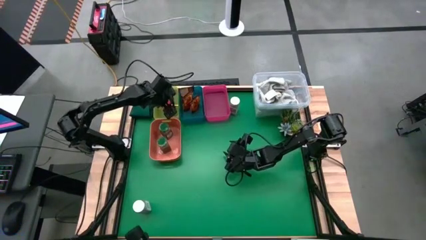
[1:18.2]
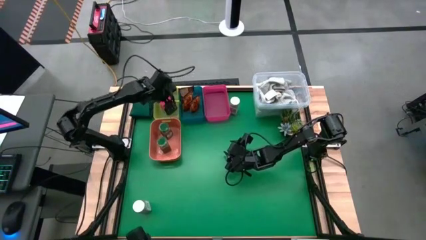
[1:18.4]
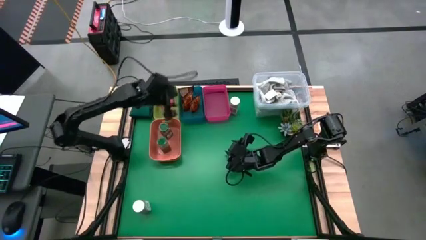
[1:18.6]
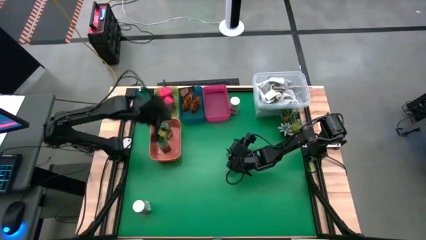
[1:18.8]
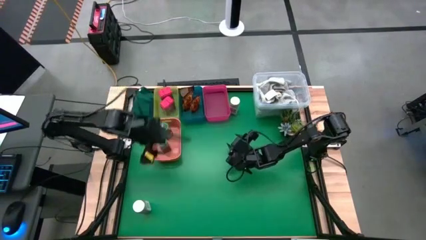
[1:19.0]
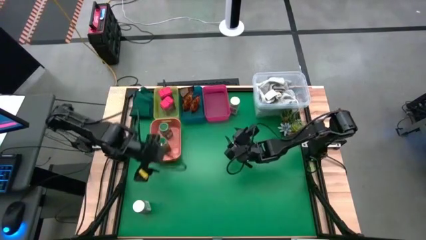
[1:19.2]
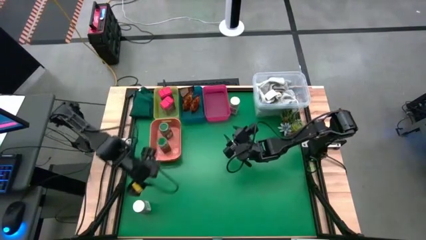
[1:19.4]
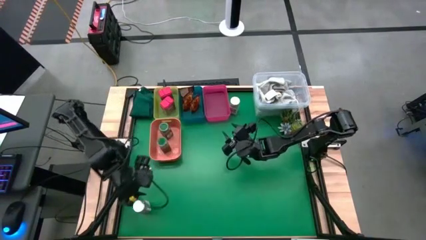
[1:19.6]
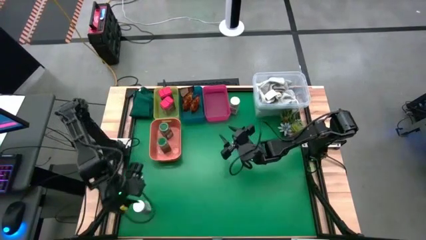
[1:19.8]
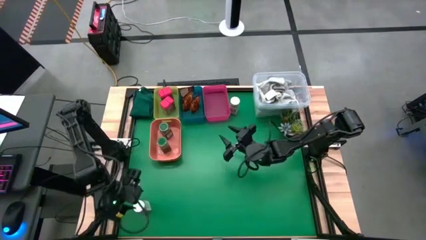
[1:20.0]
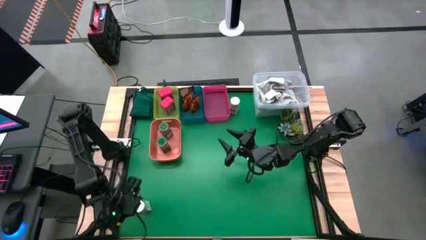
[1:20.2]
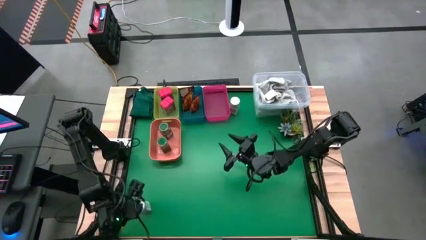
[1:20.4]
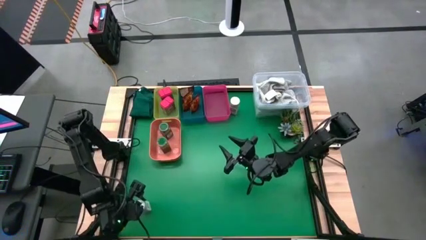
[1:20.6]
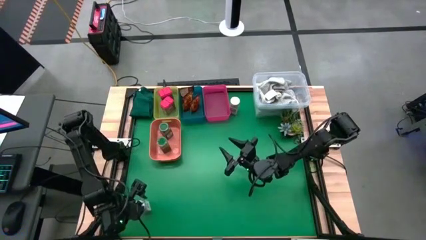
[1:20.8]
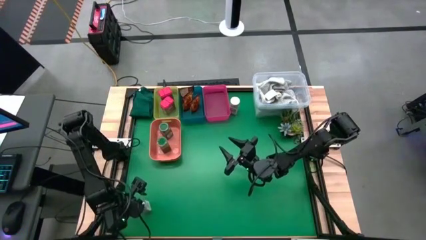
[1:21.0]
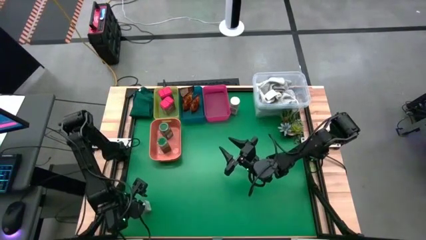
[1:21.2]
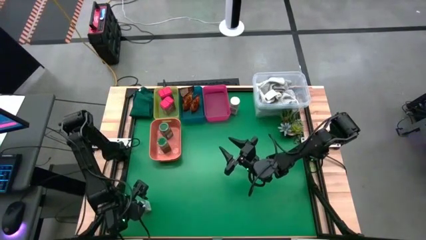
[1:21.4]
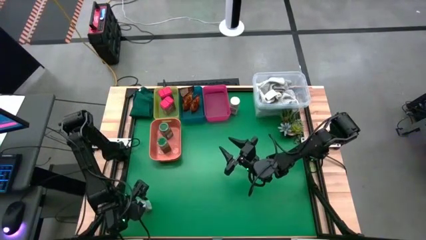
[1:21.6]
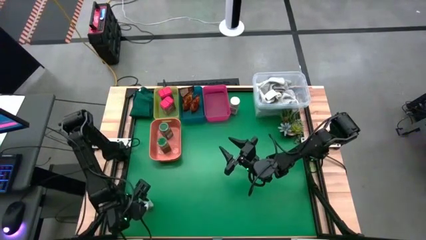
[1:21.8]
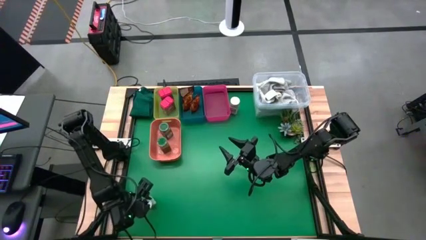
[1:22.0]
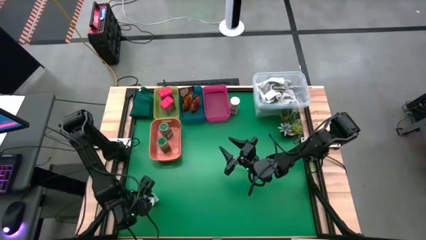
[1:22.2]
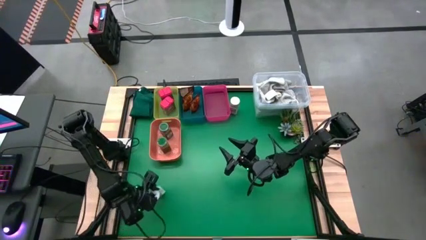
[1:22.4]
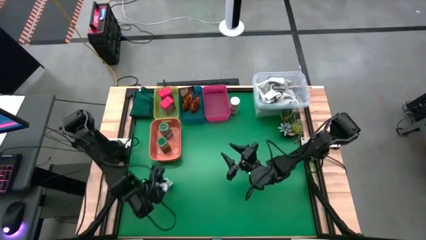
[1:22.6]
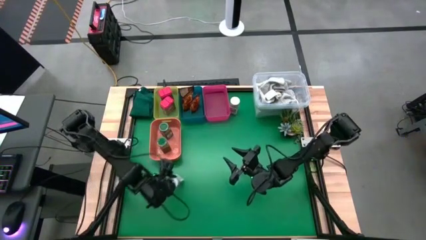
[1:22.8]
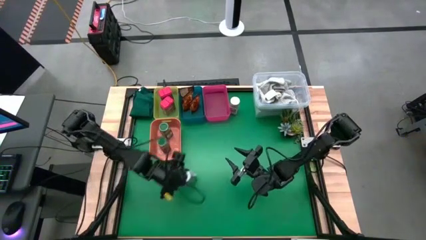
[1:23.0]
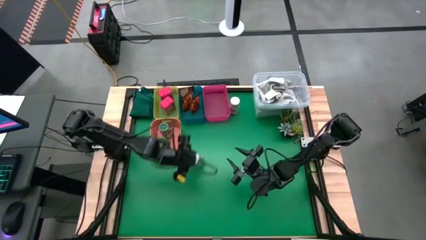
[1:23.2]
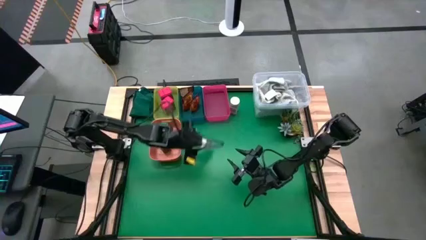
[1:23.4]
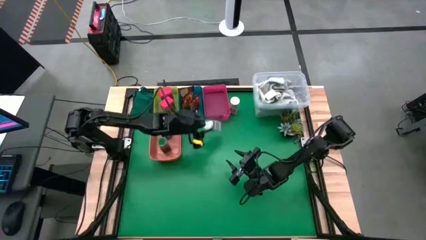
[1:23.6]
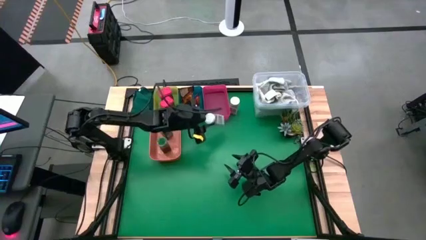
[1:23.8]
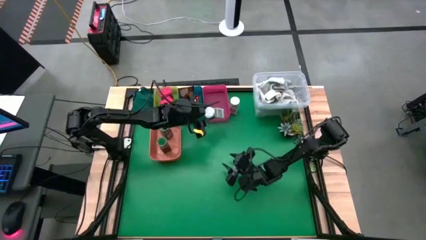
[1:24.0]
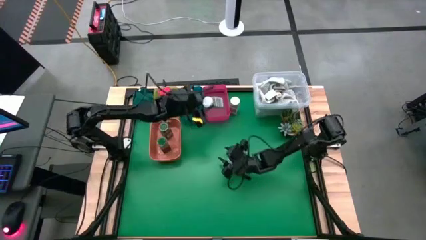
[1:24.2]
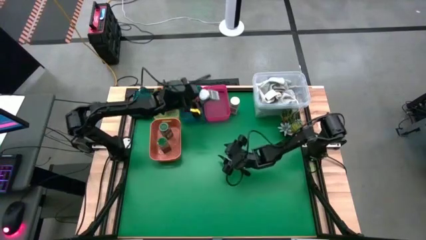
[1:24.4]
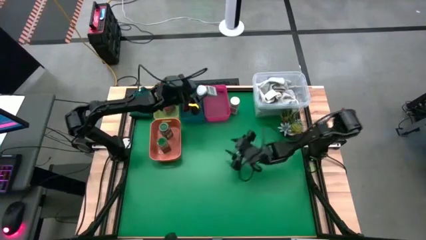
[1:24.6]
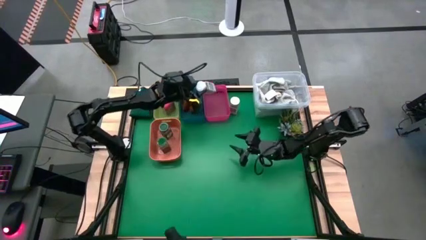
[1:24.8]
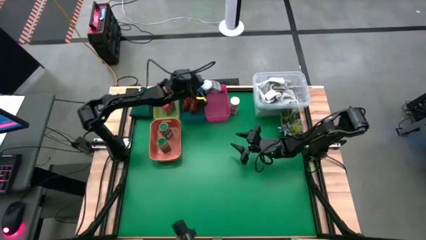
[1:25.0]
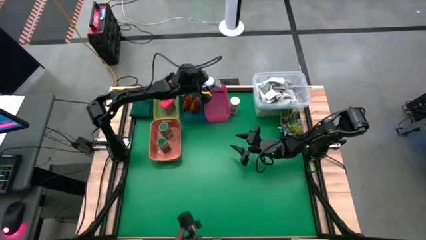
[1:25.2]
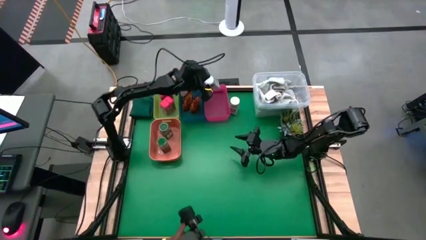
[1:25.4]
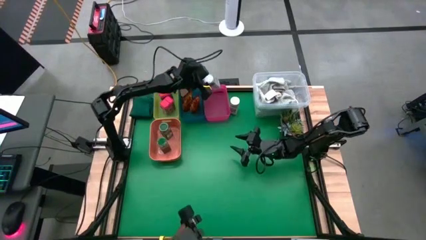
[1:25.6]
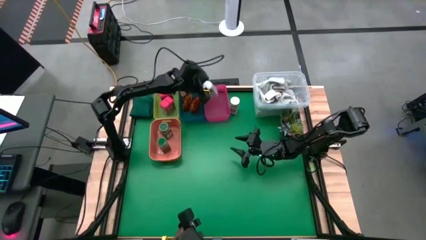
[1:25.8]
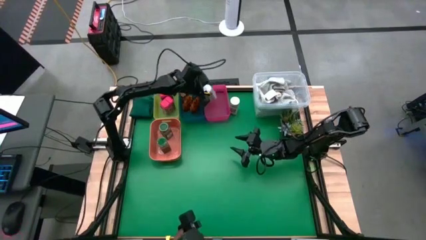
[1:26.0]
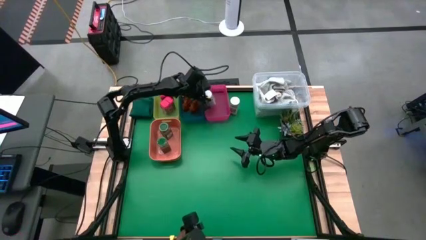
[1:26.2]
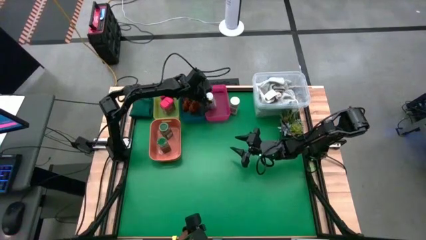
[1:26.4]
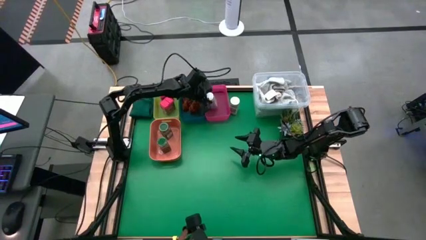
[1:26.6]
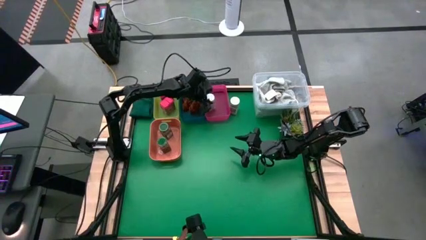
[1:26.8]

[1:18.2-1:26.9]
Task: Sort spices by type
Put the bottom white seasoning bottle into the pink bin

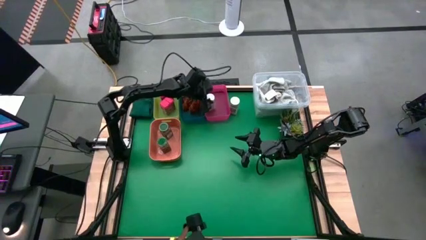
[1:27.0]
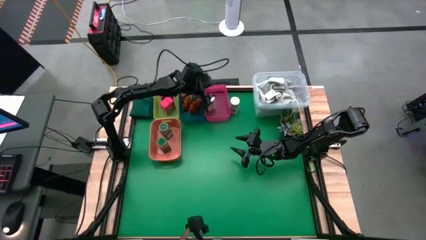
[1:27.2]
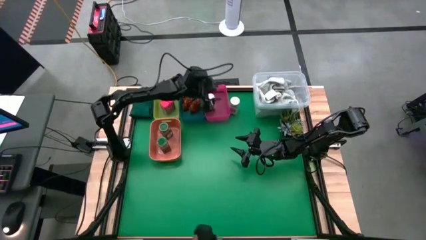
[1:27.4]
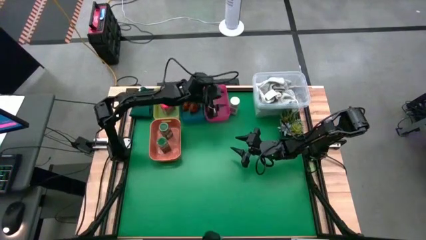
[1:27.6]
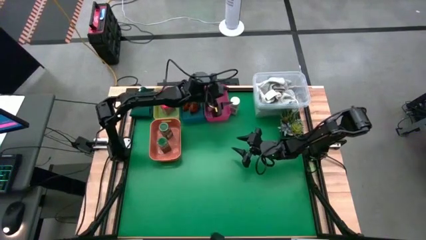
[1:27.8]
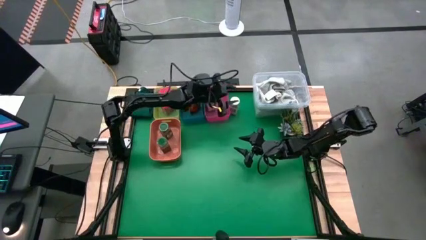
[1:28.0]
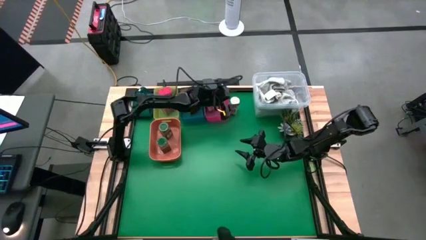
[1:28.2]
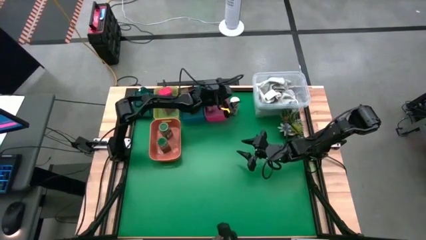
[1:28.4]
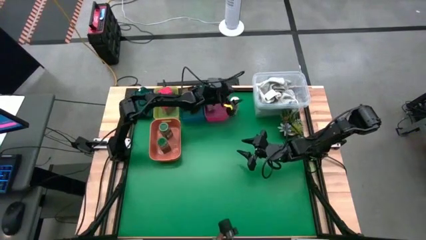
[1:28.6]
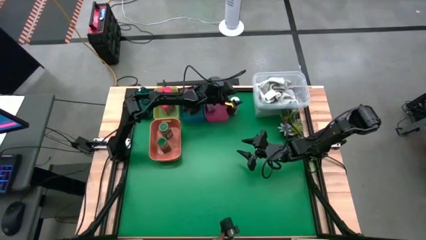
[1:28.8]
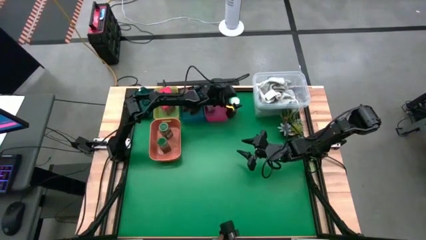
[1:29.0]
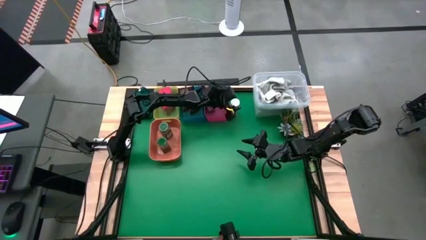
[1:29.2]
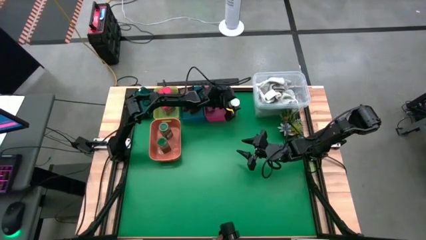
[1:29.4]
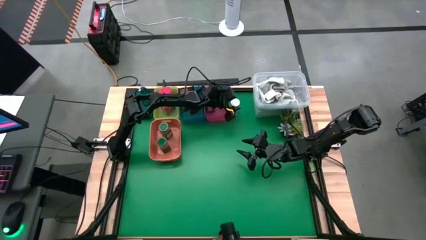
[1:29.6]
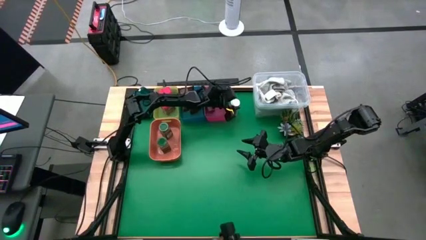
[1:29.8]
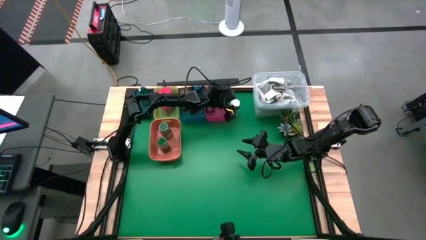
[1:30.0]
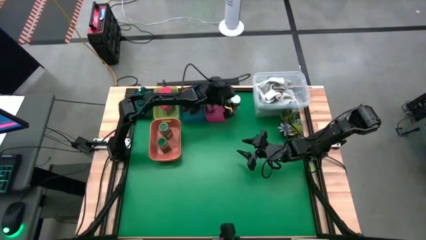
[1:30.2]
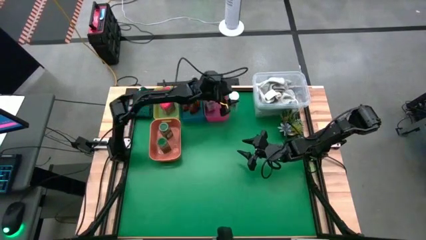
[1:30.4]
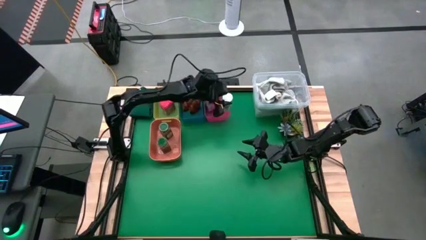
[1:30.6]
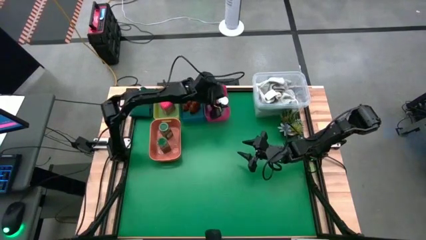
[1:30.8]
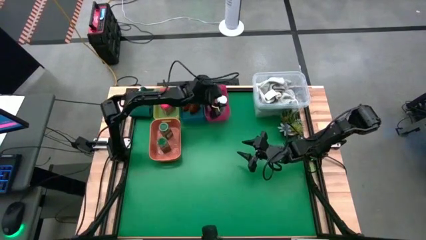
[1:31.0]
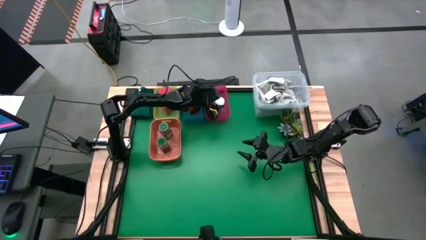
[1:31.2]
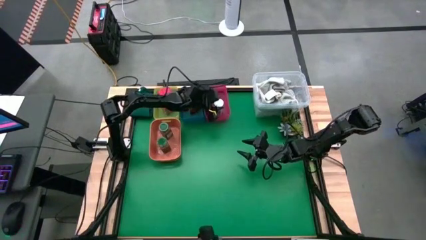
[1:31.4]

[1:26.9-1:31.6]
Put the white seasoning bottle into the pink bin
